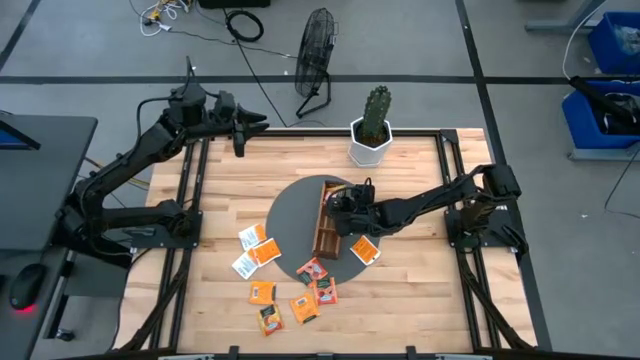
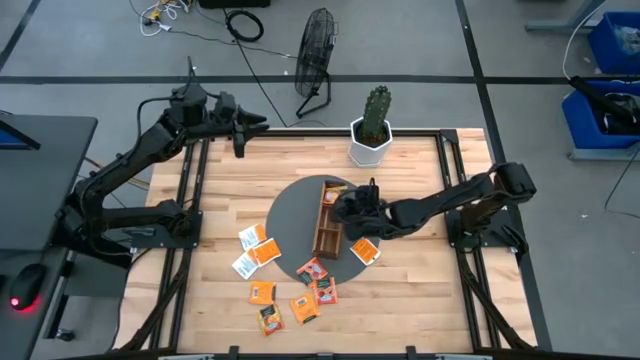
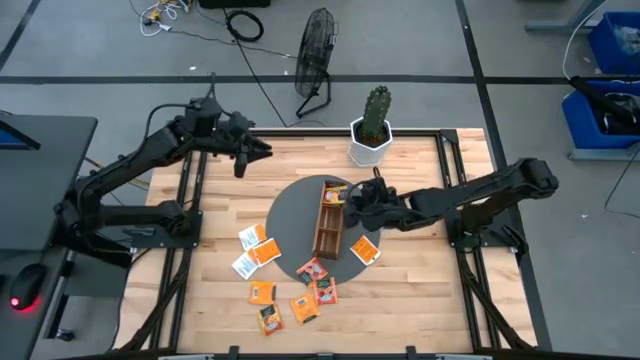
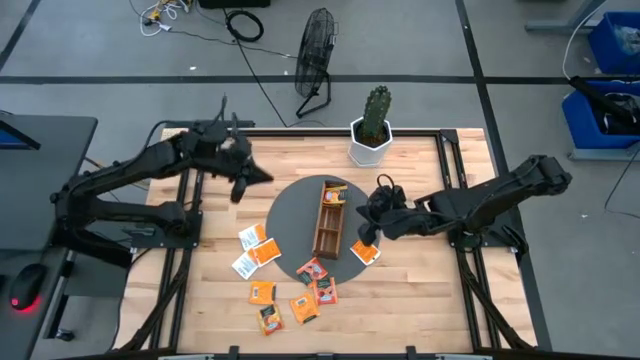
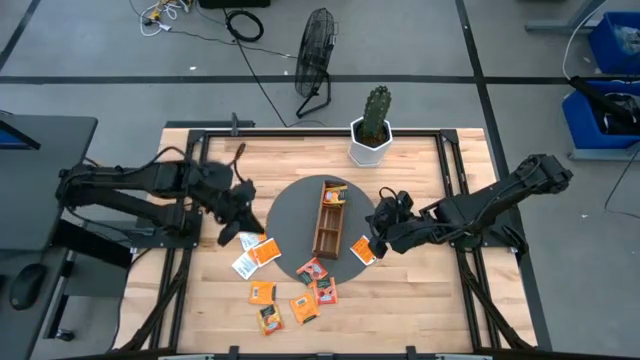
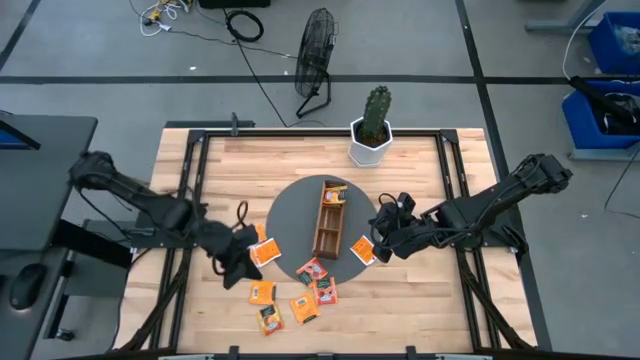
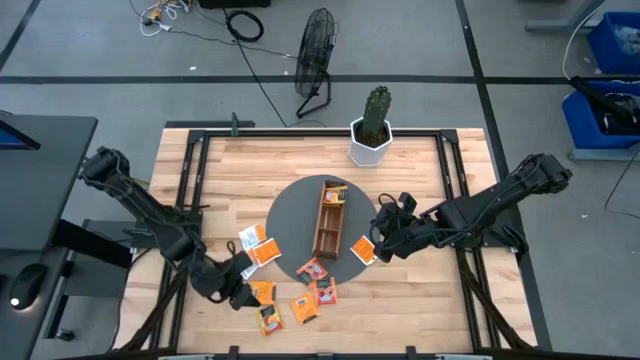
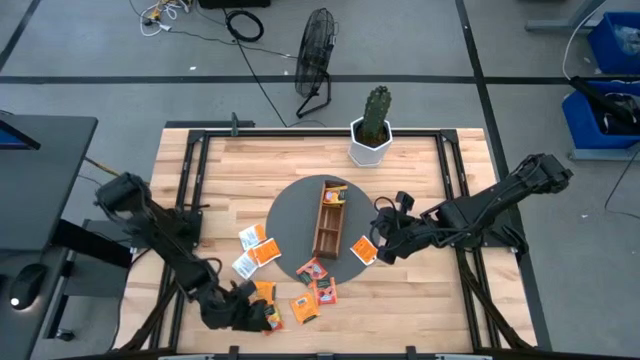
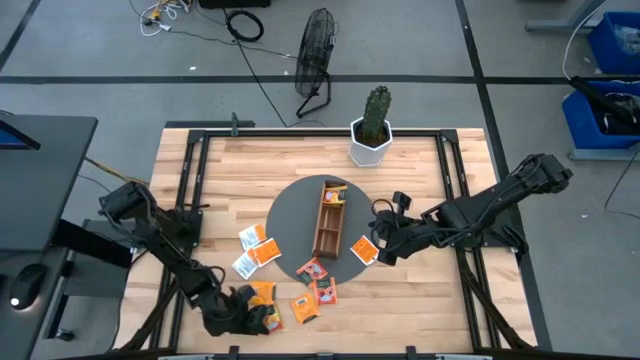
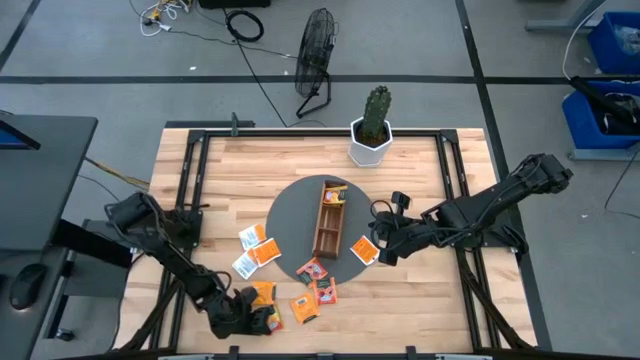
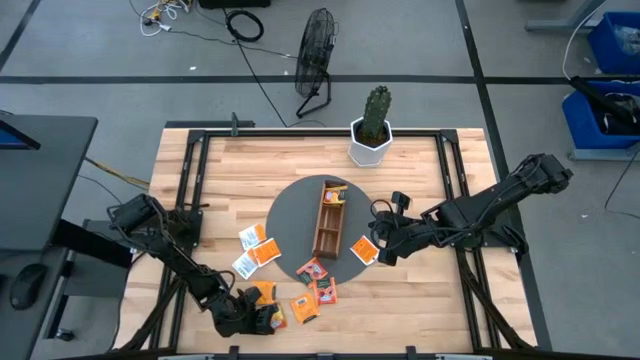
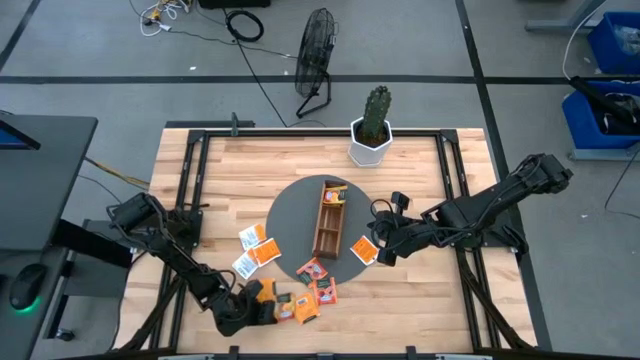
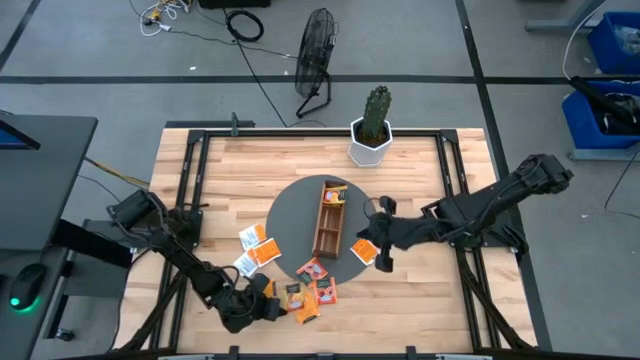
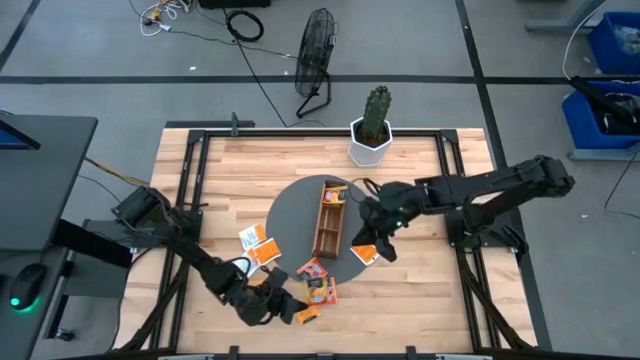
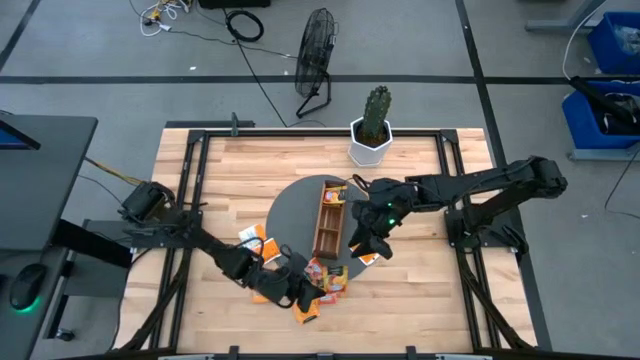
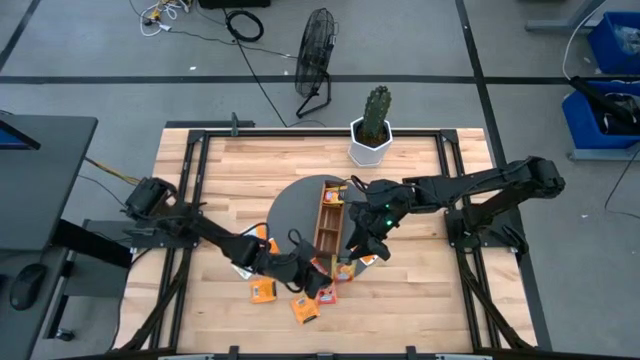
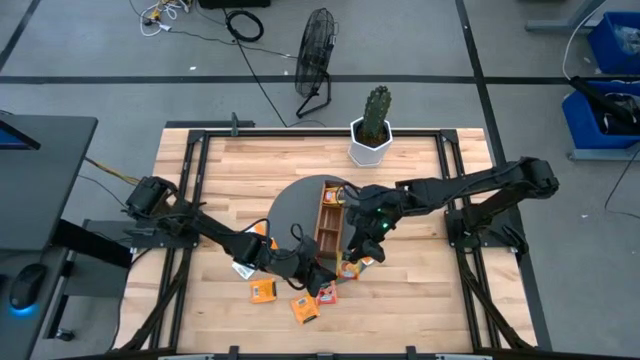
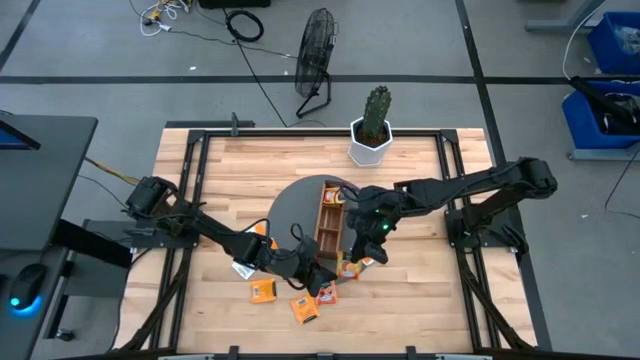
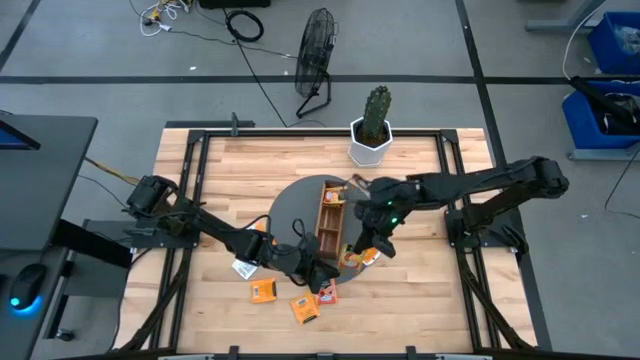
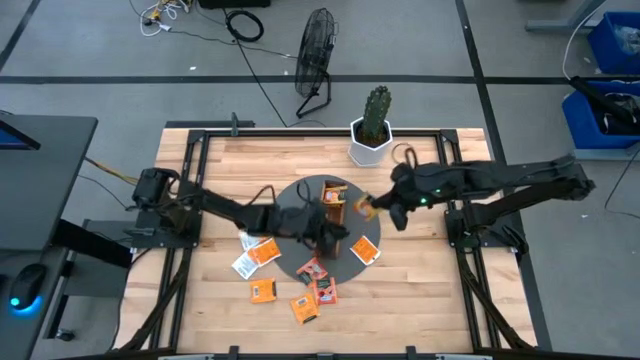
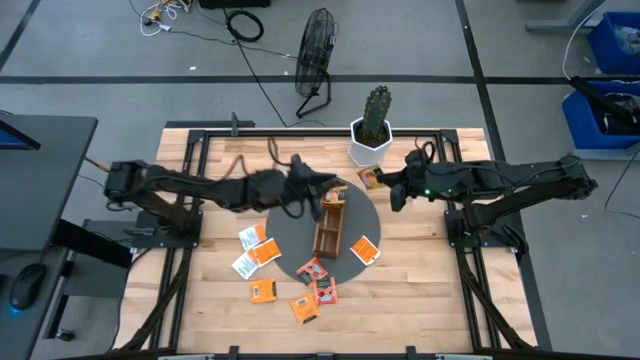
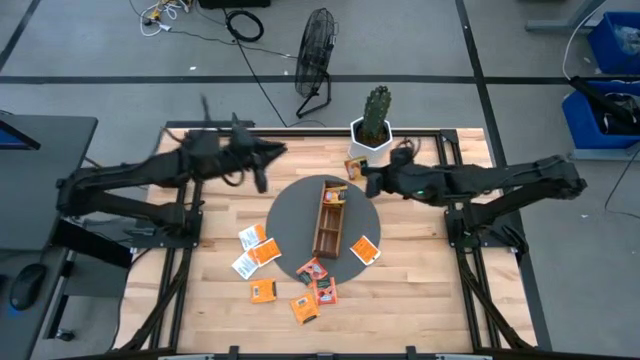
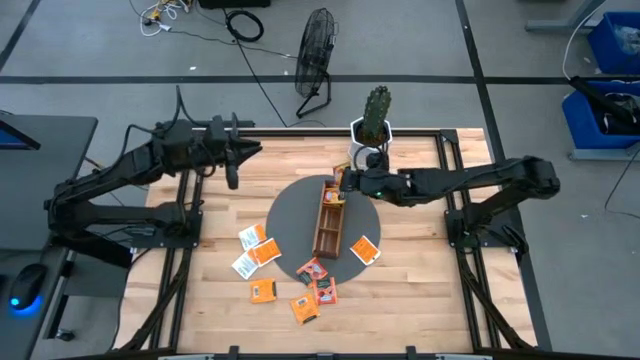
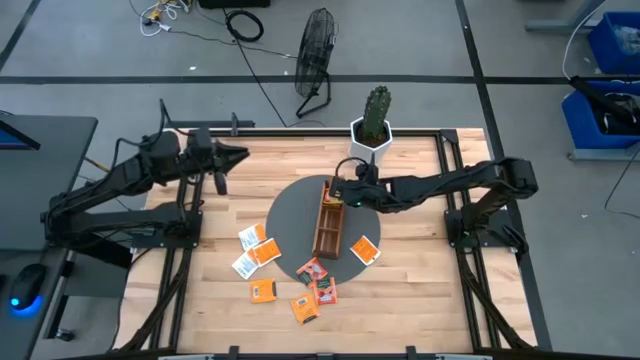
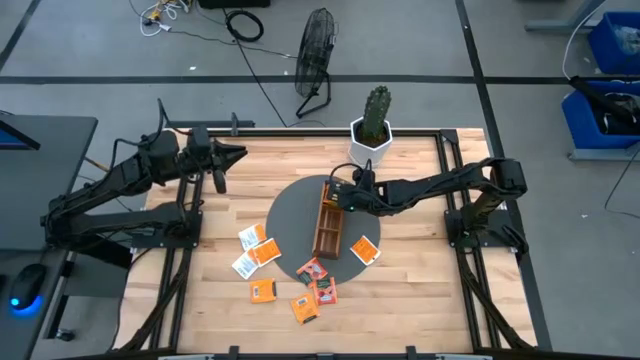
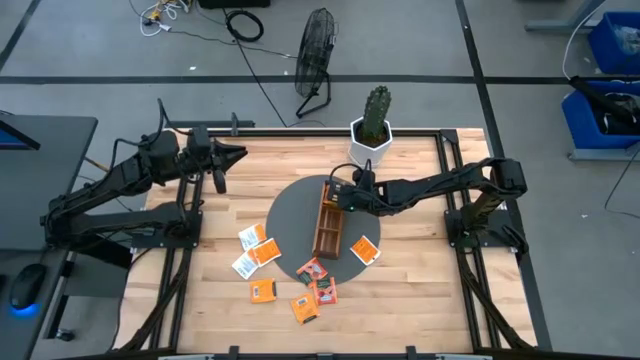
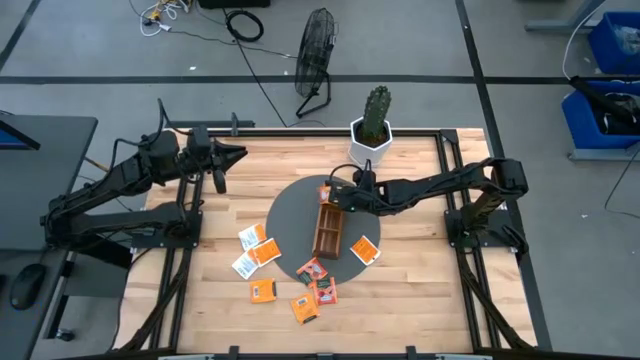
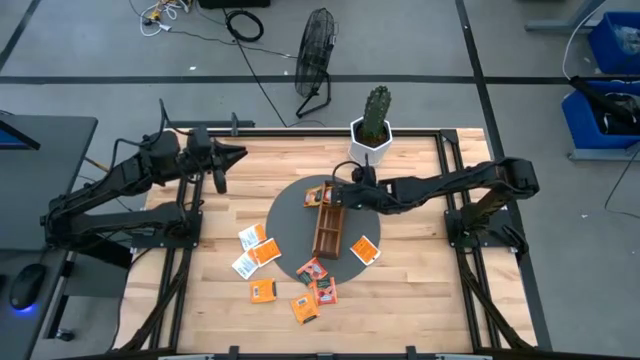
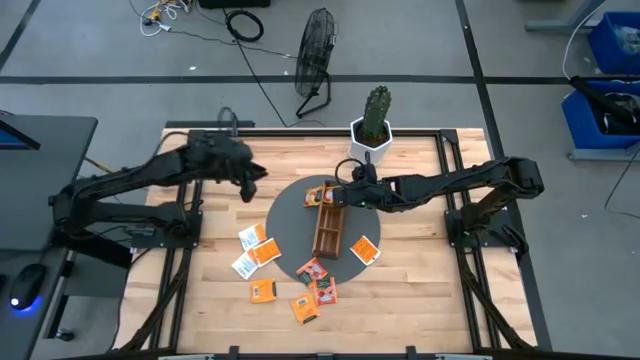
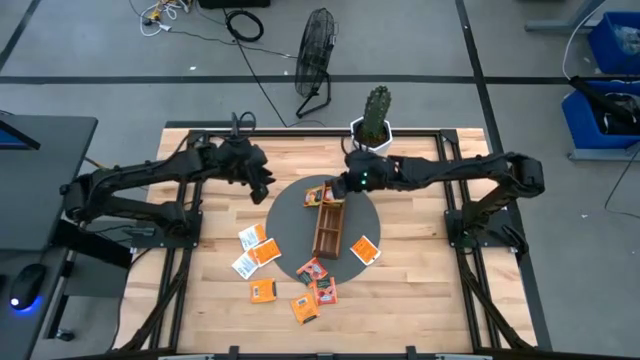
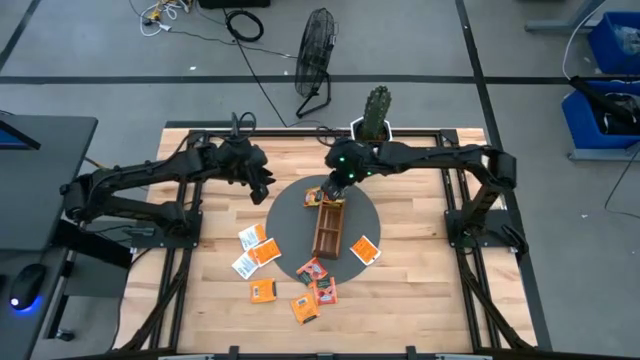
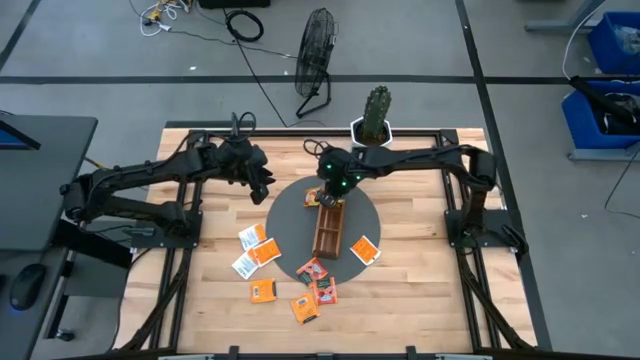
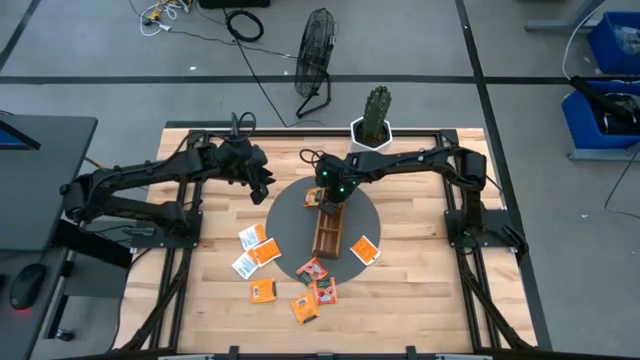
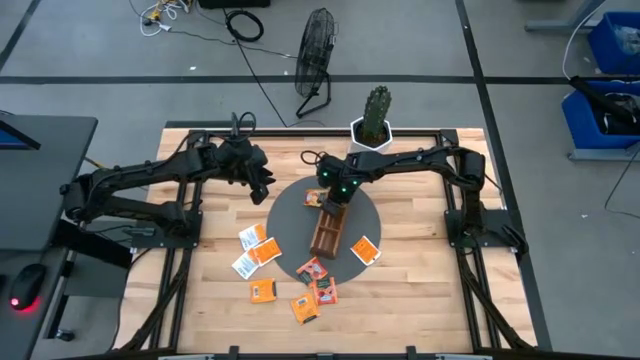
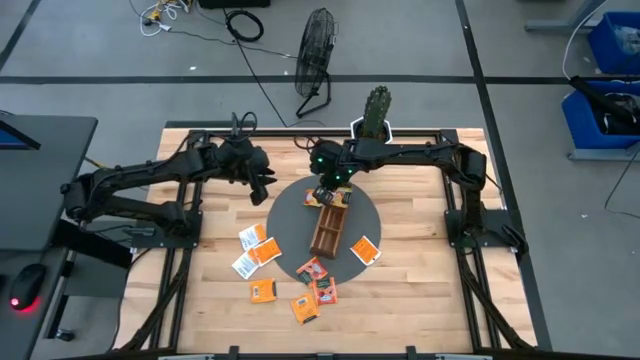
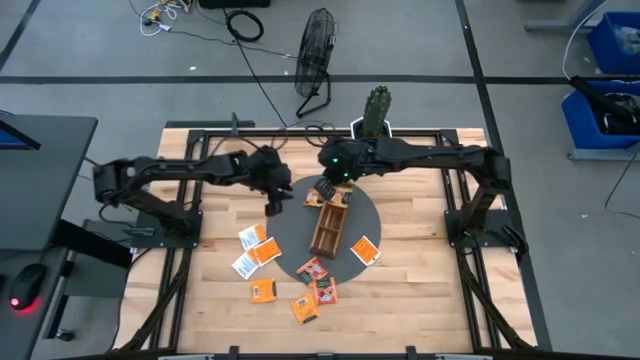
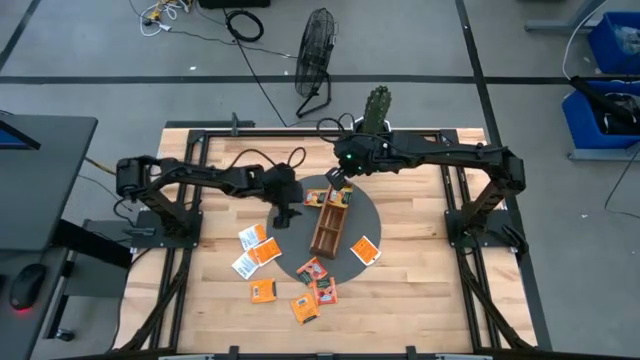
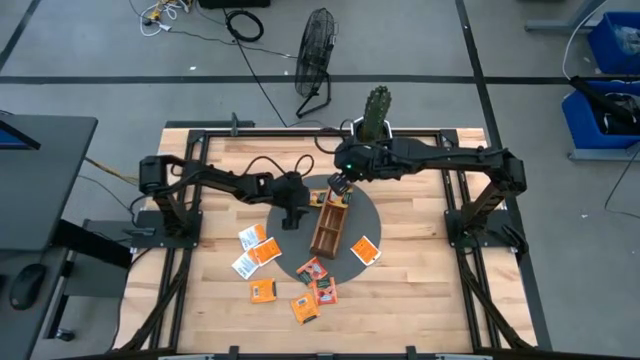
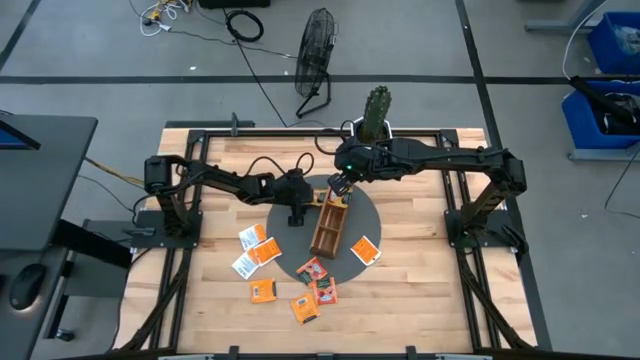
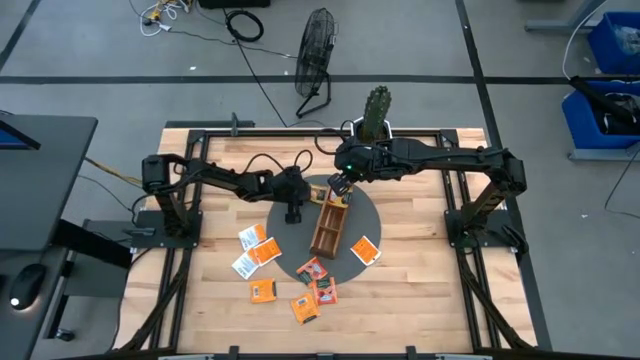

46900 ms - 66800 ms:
Task: Pick & Place Tea
Put the orange tea bag into the top section of the wooden organizer
